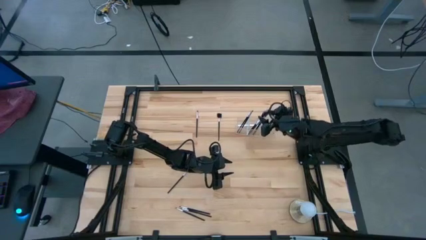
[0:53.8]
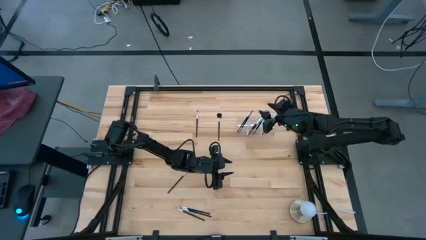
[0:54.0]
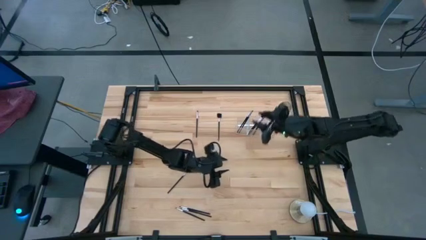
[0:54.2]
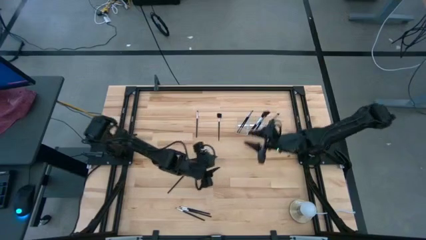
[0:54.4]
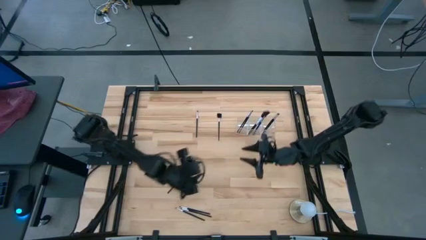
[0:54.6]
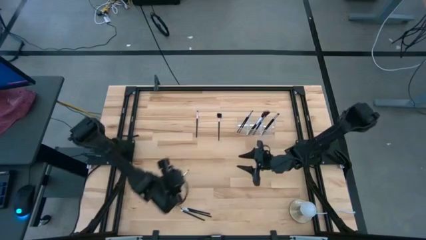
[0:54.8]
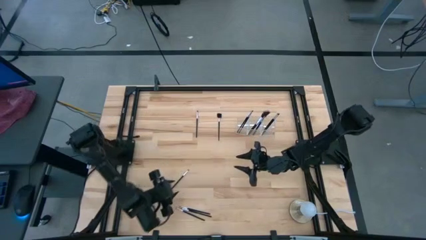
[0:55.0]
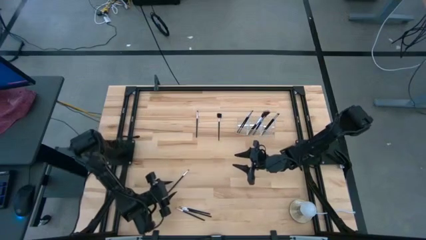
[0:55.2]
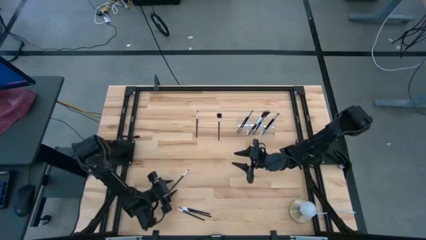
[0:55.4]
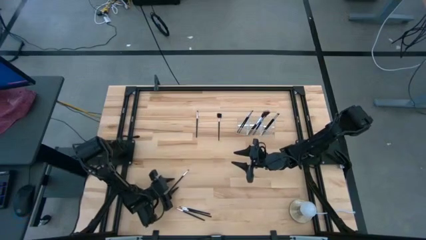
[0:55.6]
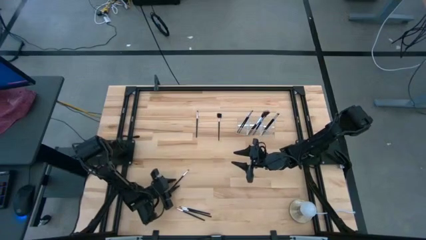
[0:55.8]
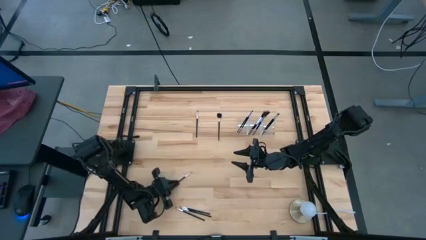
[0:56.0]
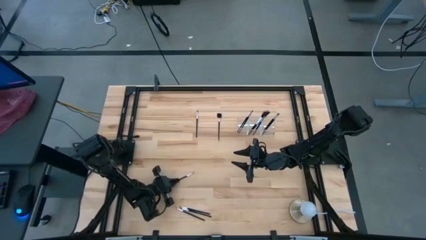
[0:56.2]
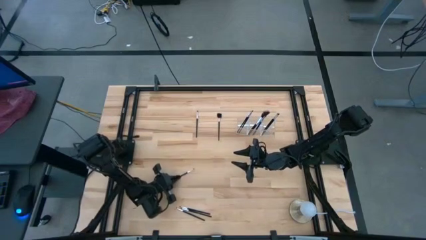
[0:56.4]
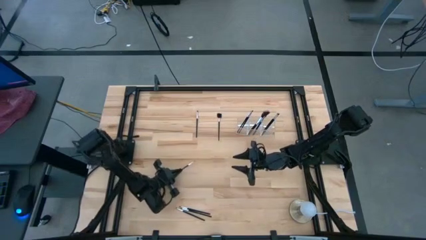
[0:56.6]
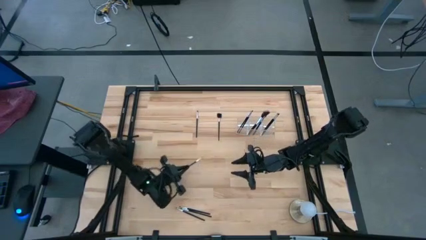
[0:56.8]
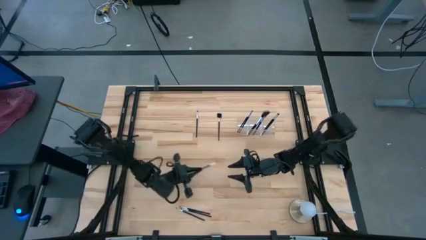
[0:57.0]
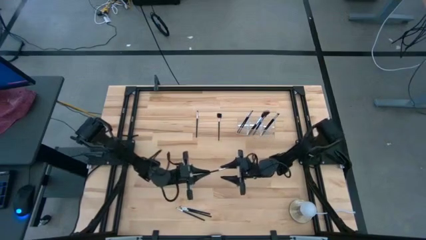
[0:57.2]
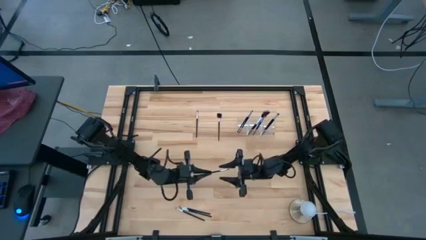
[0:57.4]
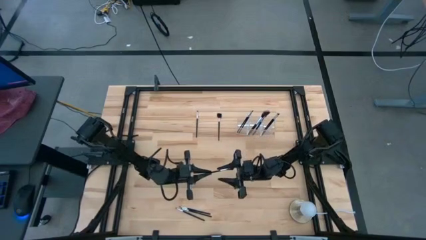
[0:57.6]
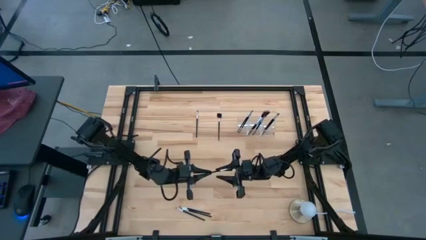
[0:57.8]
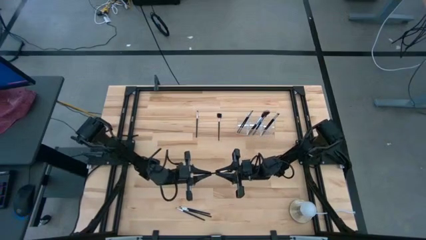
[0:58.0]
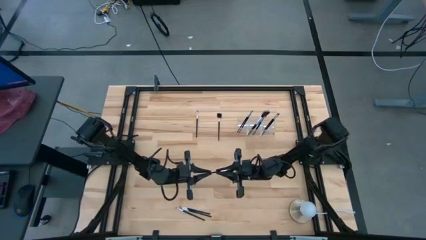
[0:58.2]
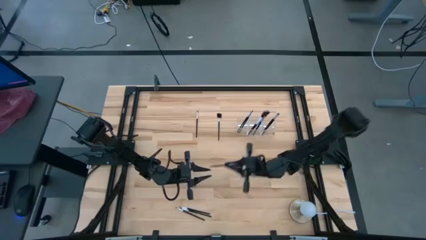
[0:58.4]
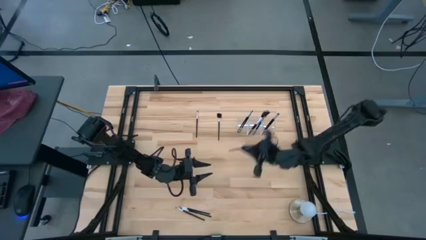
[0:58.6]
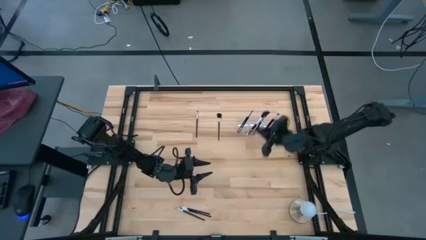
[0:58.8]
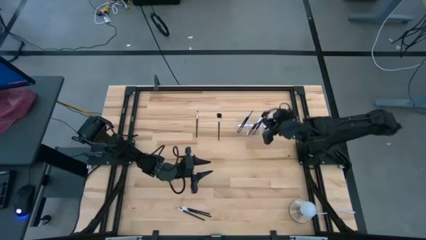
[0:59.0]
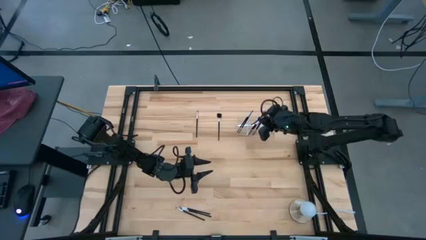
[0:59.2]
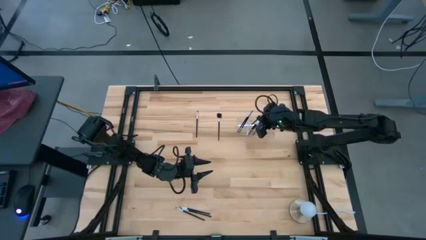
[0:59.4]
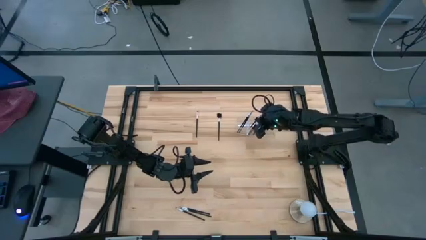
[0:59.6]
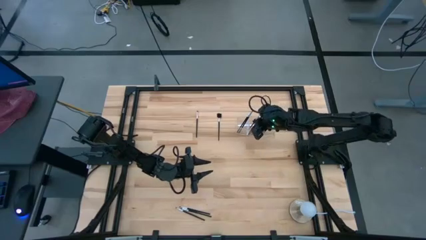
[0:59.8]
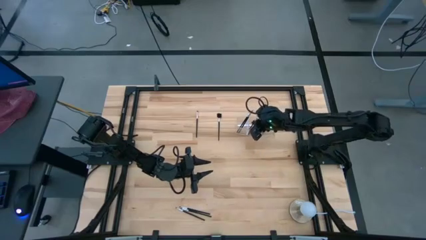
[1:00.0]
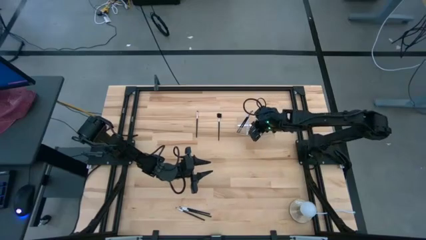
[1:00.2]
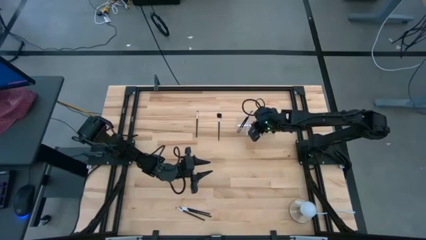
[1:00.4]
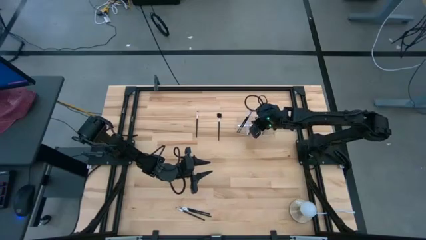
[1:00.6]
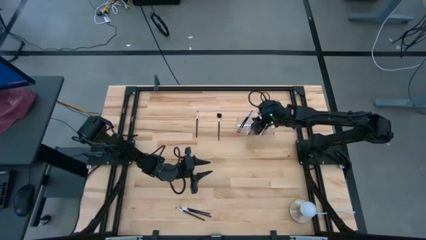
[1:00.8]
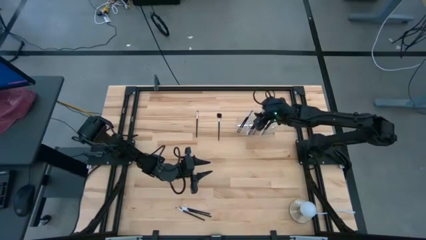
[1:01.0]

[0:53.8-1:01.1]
Task: Put items in baskets/containers
Put the black eyeshadow brush into the transparent organizer

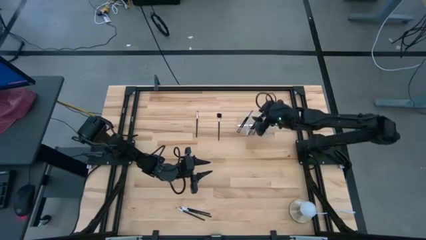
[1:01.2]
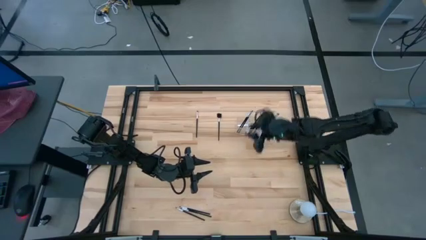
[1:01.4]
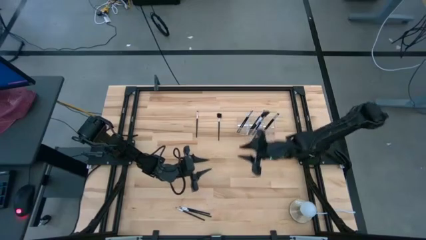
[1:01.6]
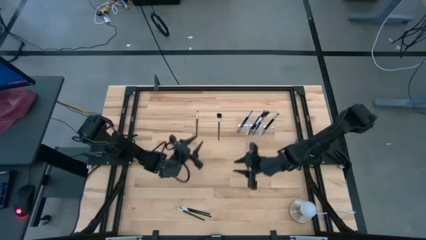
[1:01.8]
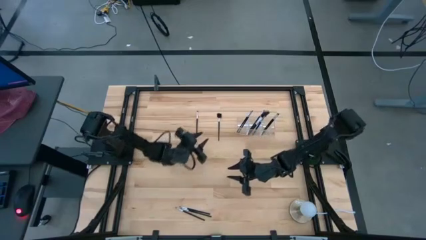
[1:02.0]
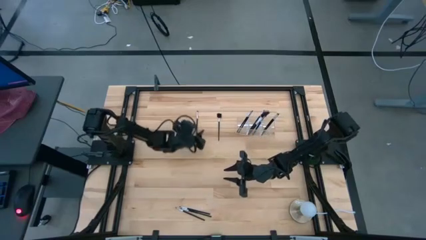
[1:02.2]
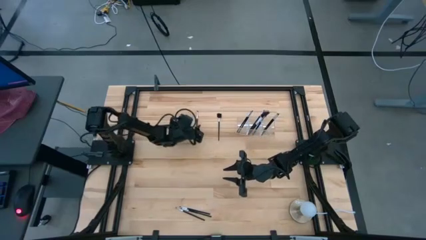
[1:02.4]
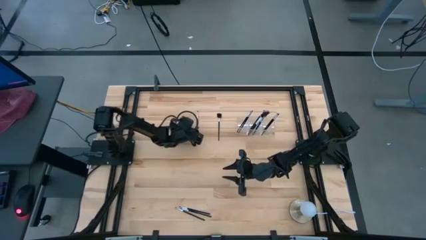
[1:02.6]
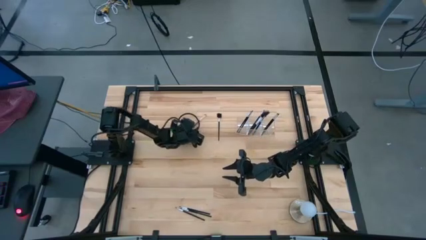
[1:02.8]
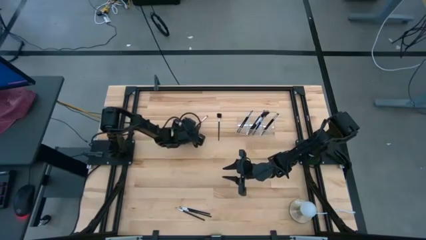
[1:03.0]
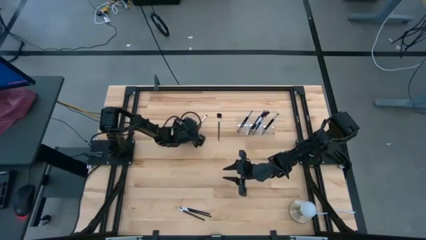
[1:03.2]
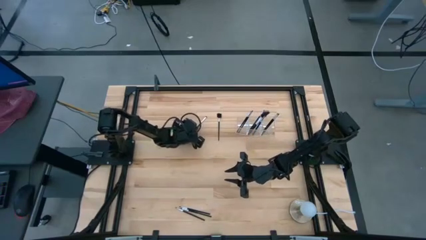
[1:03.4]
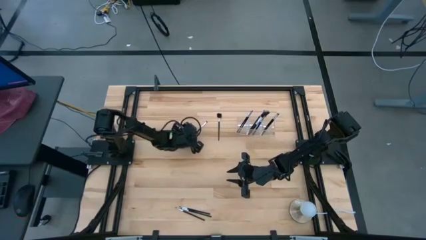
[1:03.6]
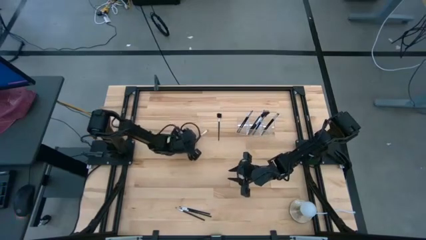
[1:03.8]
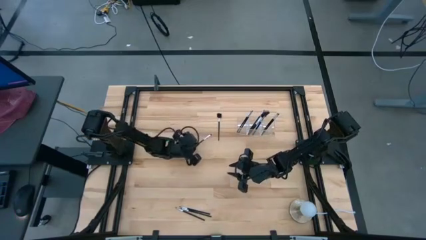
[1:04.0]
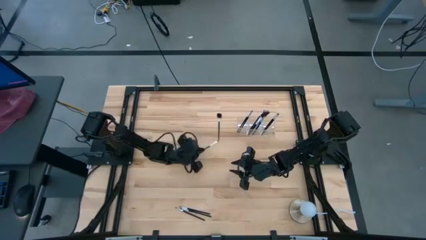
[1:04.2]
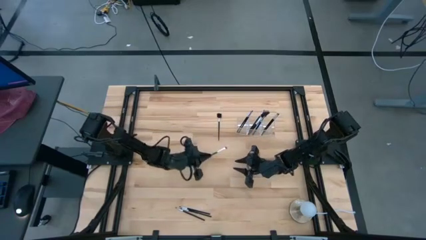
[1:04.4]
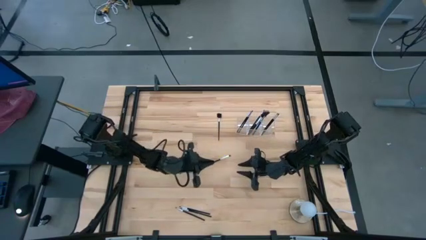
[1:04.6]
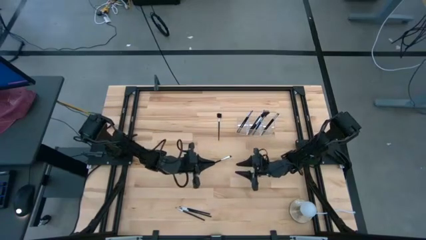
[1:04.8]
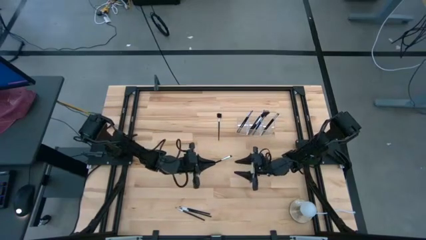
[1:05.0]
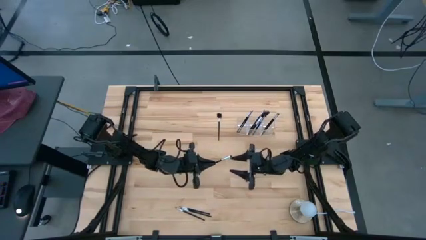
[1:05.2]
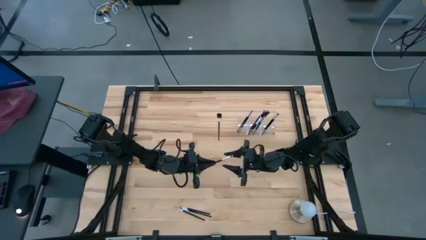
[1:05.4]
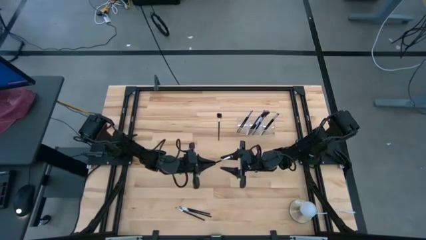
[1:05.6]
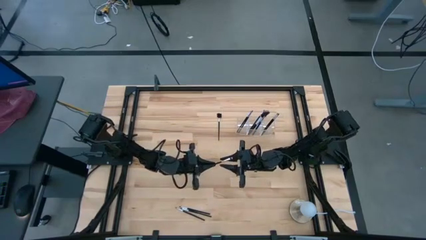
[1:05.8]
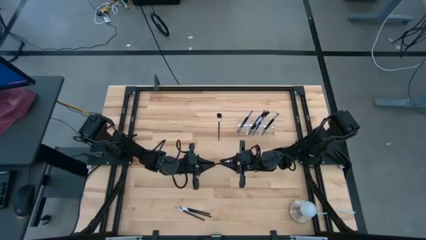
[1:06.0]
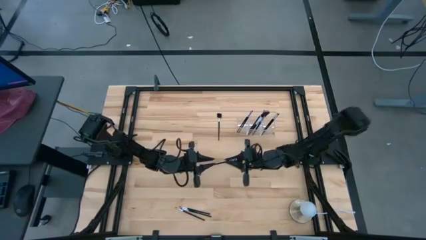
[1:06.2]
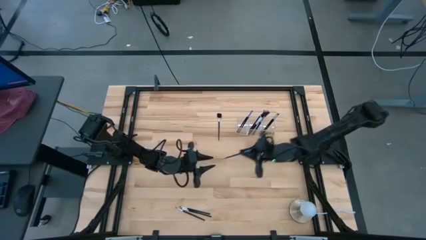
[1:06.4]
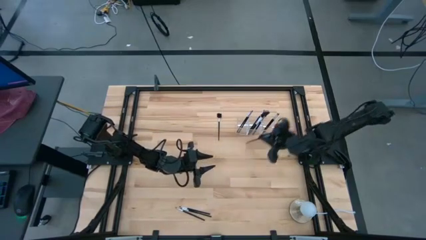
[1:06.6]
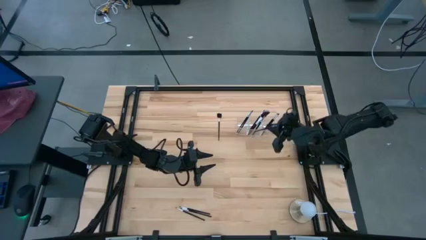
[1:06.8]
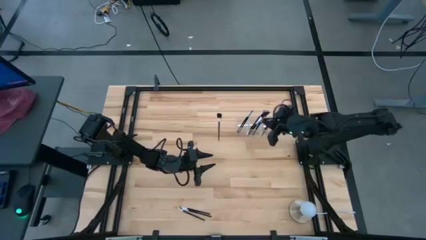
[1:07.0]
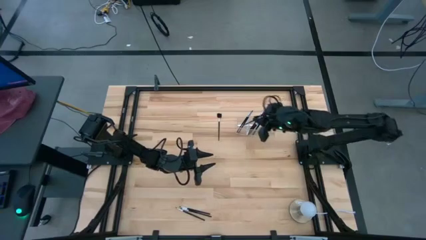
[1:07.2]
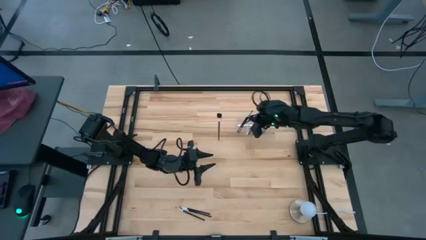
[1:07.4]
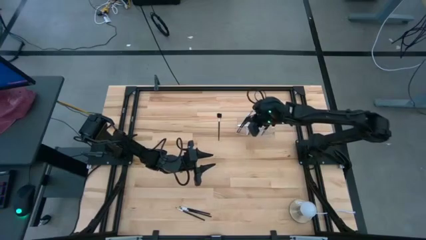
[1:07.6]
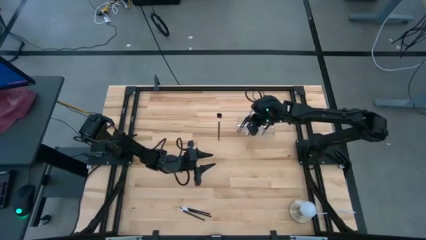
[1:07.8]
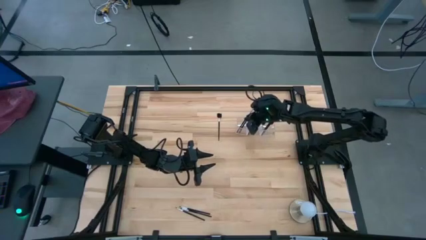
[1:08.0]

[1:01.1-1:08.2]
Put the black eyeshadow brush into the transparent organizer

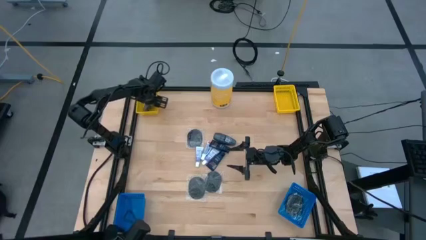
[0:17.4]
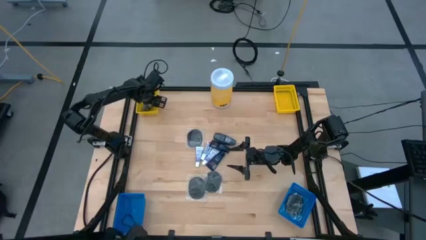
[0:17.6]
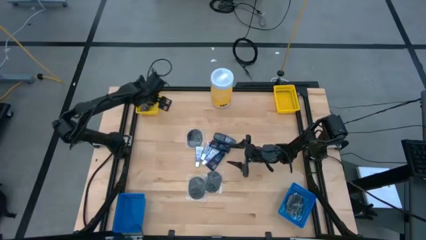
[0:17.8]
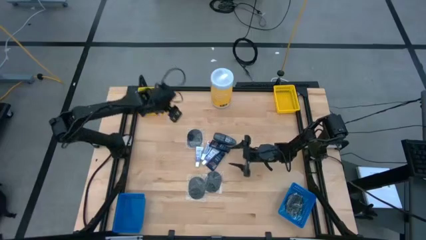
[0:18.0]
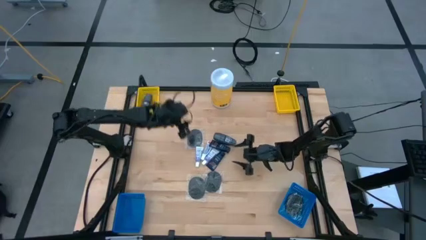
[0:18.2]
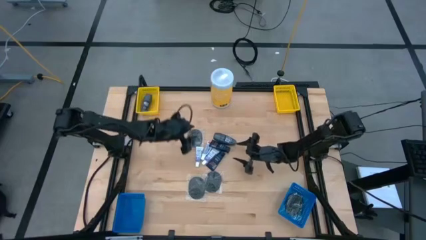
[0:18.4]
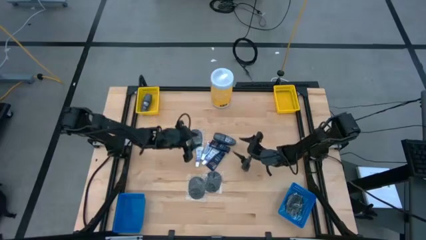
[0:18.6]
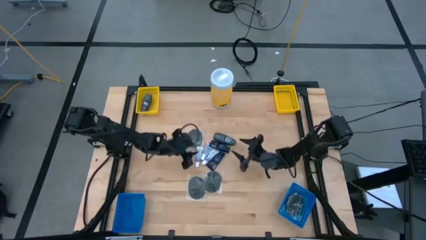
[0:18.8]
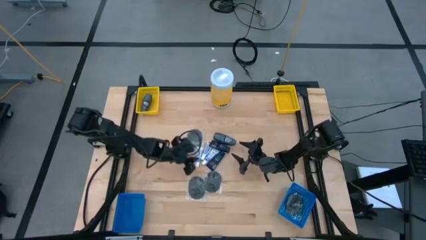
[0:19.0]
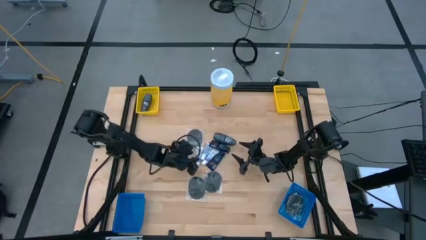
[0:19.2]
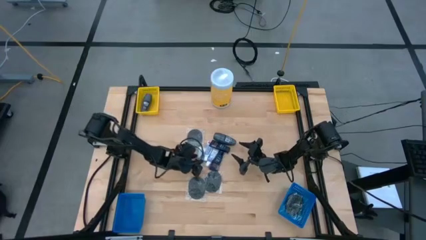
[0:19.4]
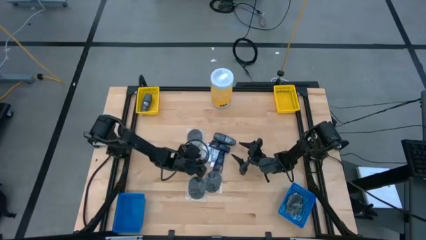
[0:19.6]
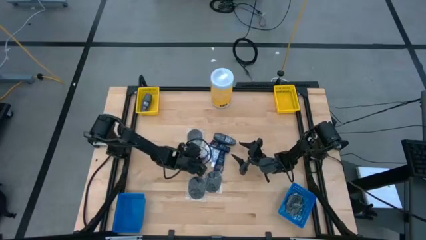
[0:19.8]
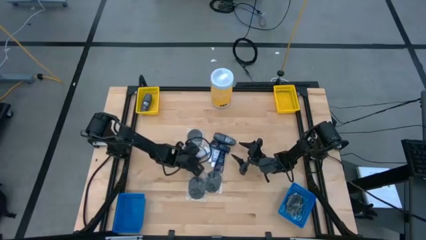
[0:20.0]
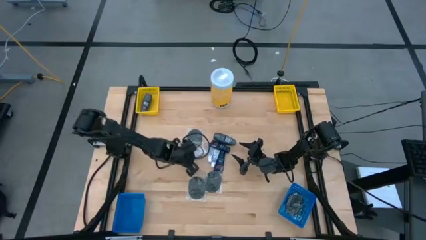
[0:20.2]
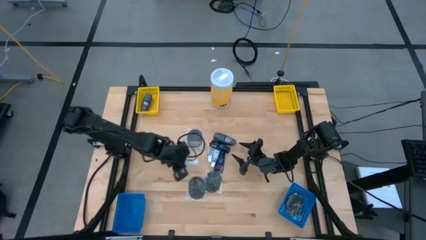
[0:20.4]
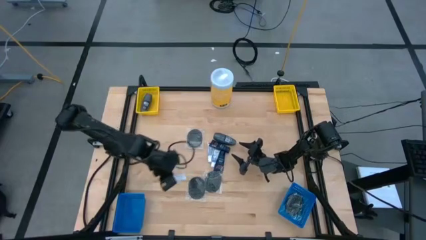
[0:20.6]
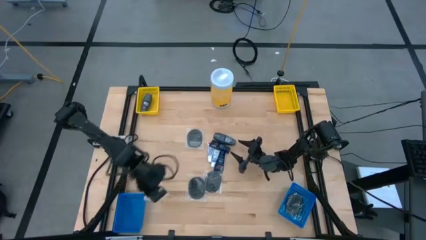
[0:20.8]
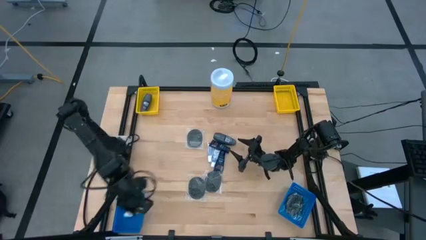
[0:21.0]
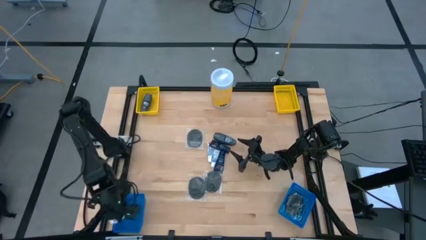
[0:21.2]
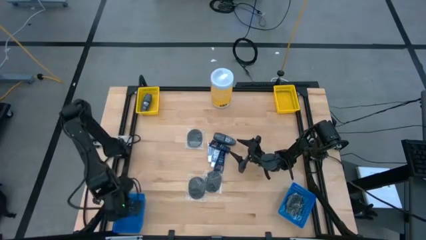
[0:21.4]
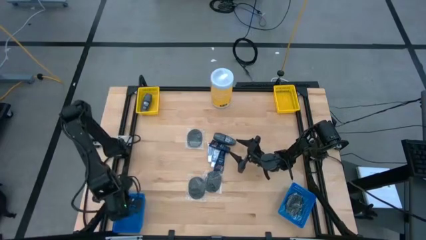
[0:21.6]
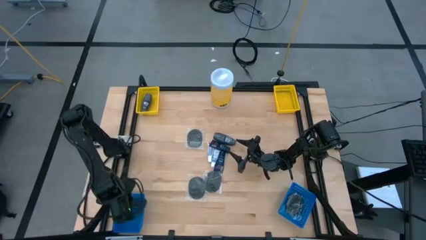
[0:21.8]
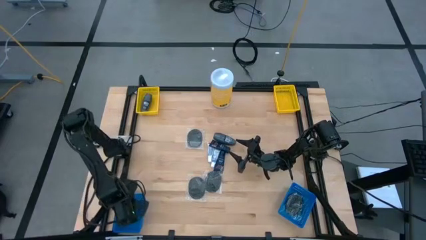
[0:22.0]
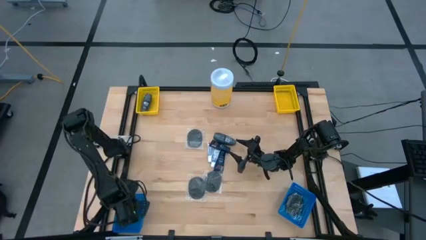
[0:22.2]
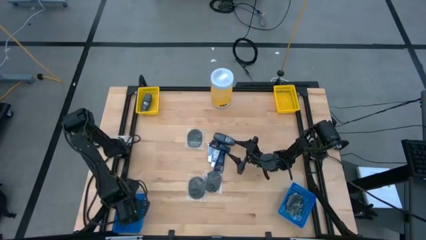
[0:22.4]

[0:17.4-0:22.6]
Task: Pick & Place Travel size toiletries
Put the white toothpaste into the left blue bin
